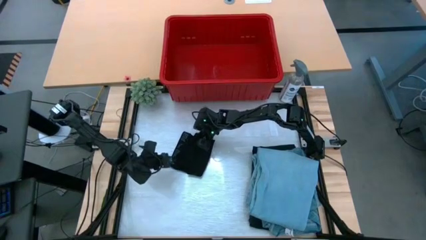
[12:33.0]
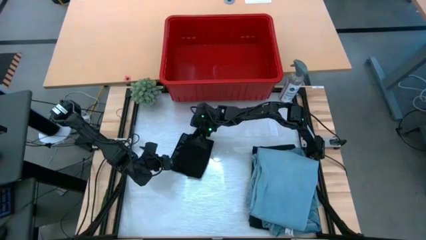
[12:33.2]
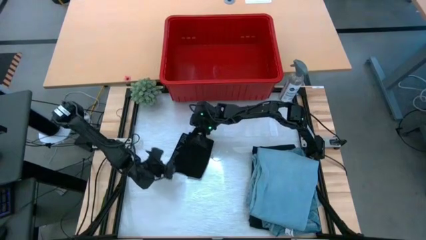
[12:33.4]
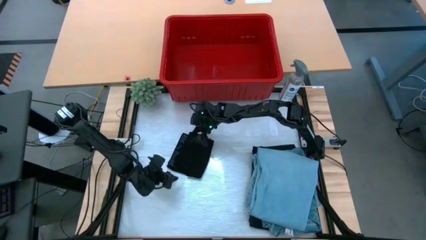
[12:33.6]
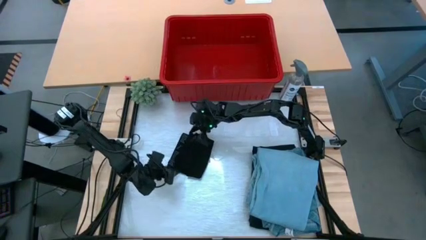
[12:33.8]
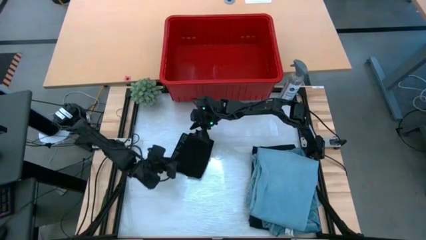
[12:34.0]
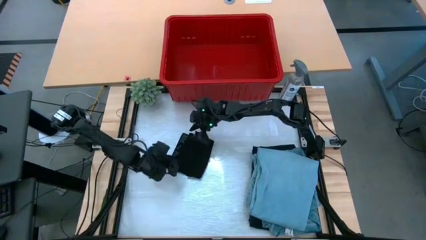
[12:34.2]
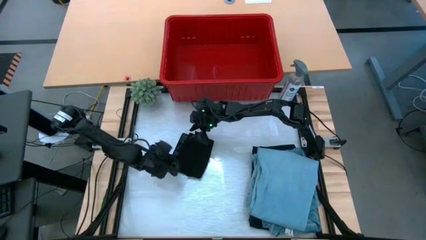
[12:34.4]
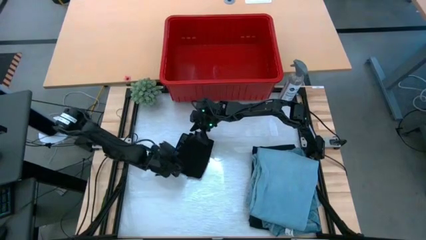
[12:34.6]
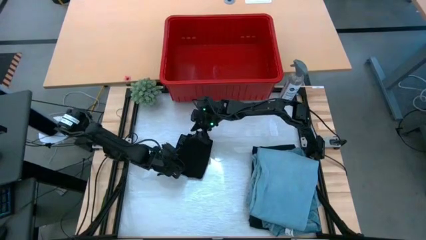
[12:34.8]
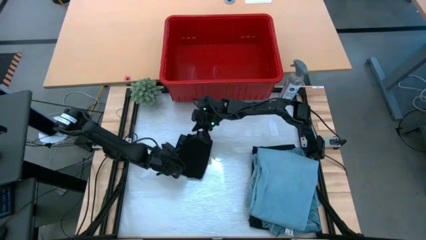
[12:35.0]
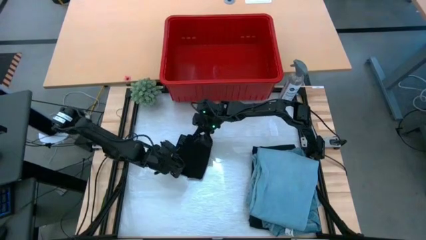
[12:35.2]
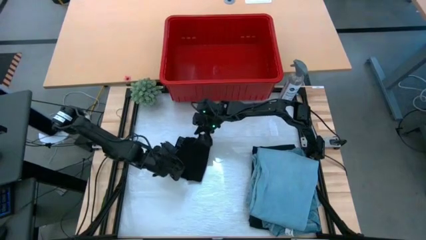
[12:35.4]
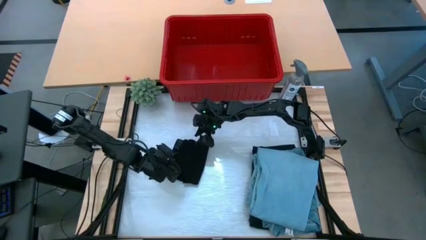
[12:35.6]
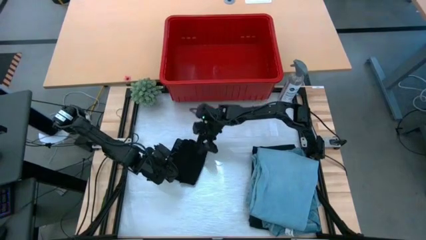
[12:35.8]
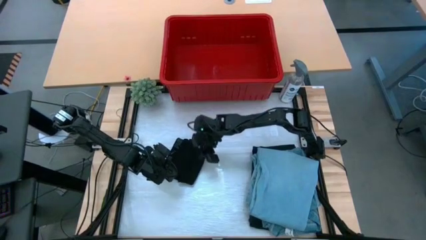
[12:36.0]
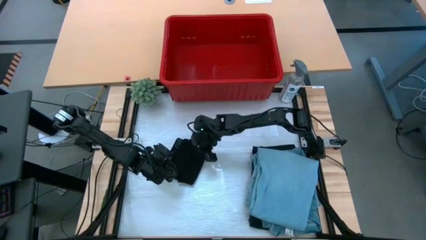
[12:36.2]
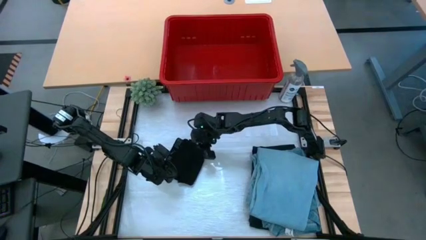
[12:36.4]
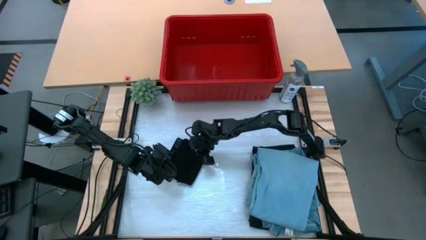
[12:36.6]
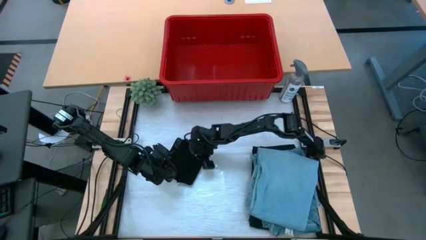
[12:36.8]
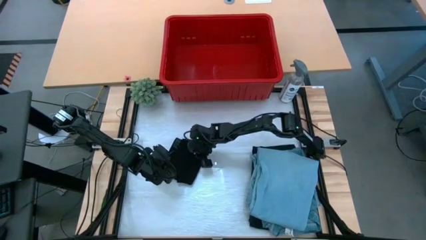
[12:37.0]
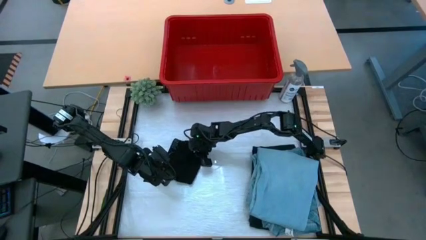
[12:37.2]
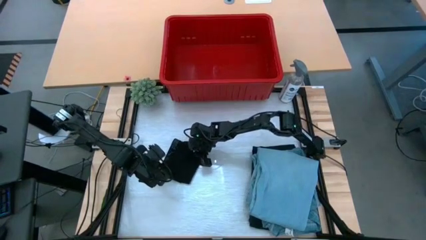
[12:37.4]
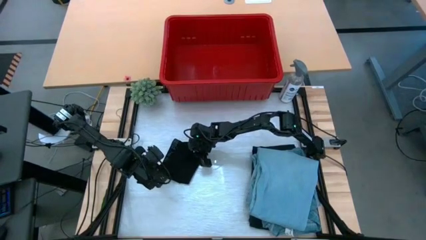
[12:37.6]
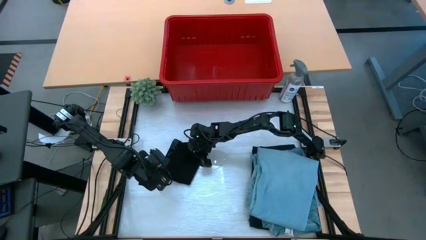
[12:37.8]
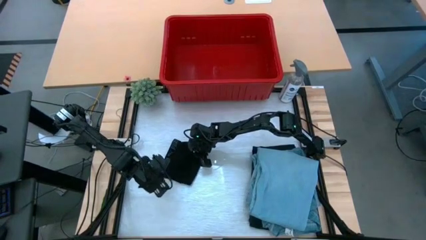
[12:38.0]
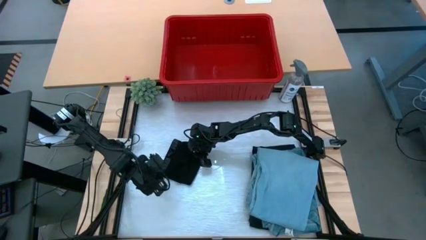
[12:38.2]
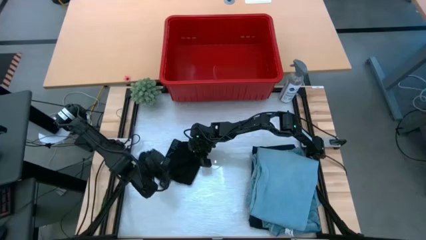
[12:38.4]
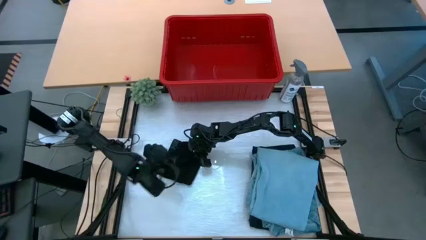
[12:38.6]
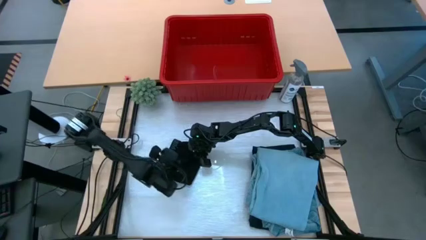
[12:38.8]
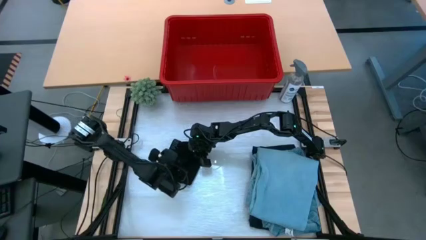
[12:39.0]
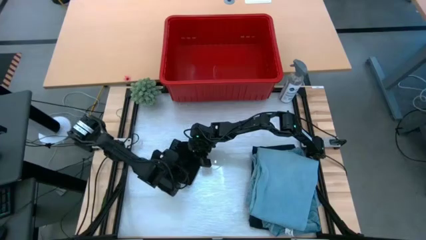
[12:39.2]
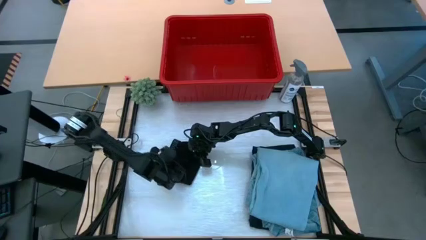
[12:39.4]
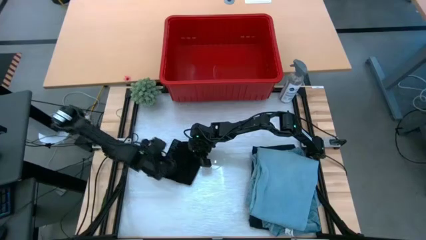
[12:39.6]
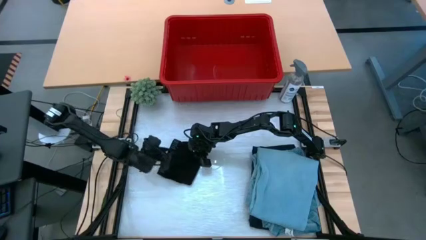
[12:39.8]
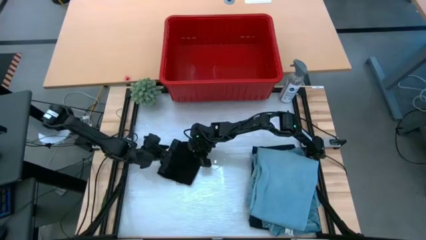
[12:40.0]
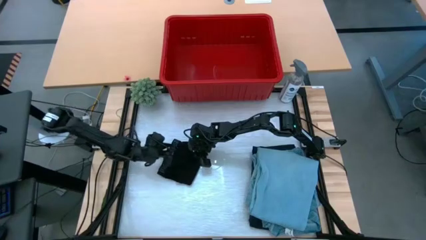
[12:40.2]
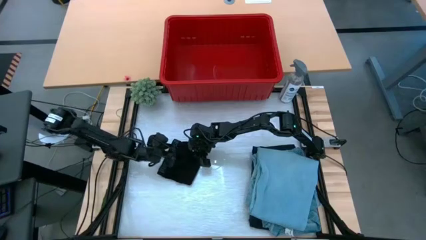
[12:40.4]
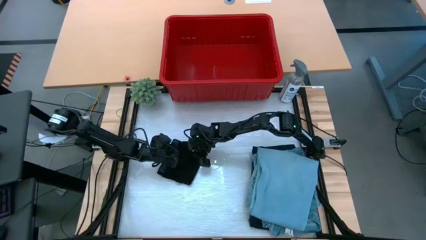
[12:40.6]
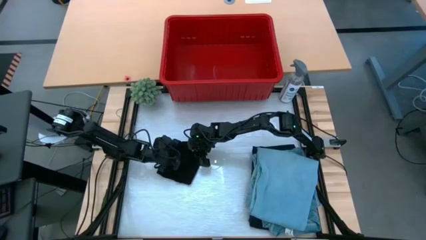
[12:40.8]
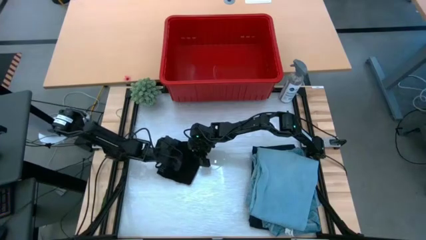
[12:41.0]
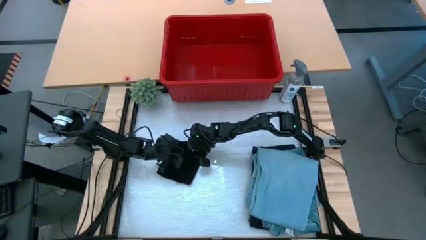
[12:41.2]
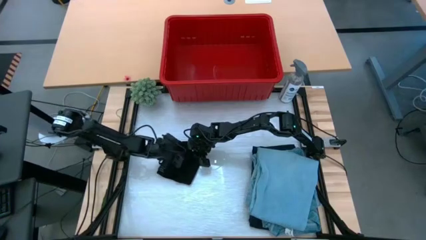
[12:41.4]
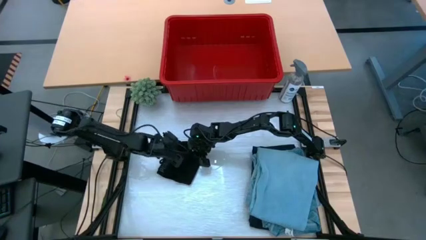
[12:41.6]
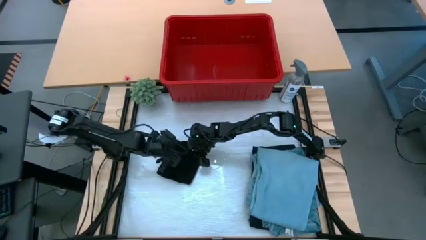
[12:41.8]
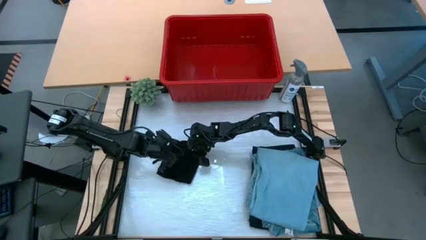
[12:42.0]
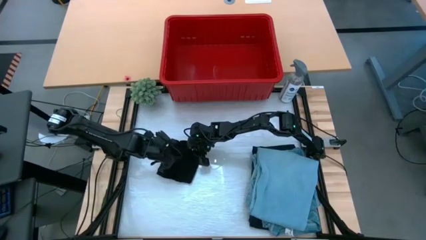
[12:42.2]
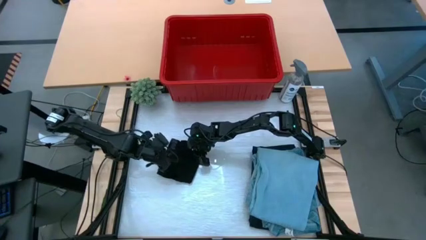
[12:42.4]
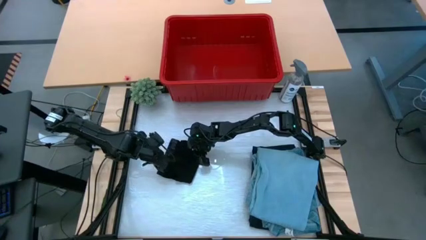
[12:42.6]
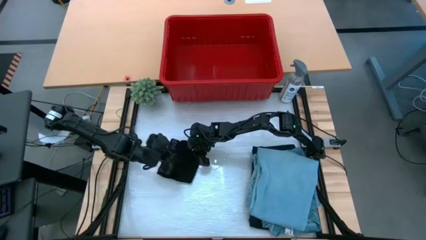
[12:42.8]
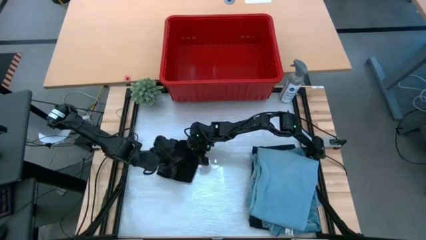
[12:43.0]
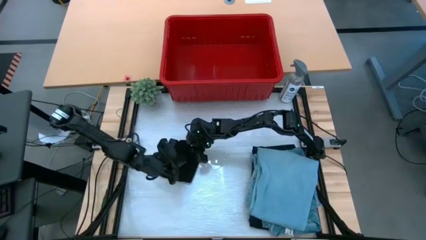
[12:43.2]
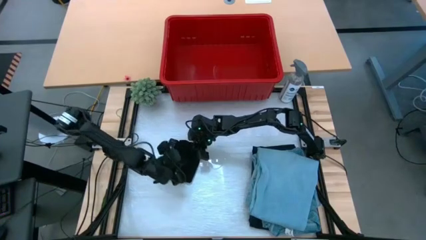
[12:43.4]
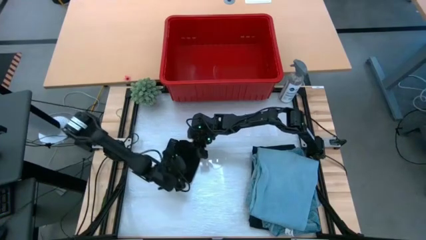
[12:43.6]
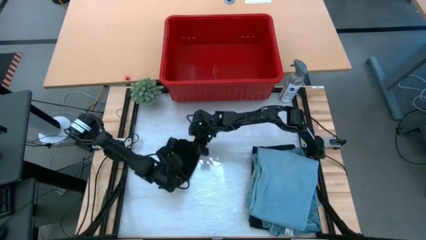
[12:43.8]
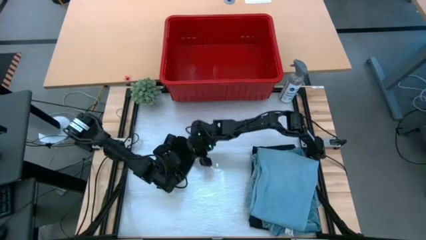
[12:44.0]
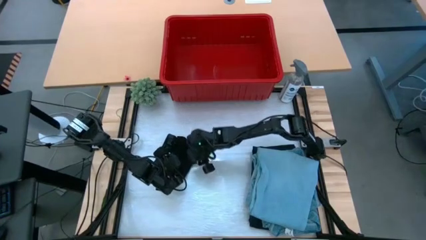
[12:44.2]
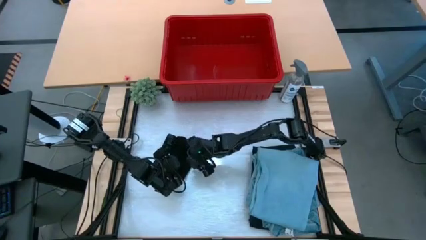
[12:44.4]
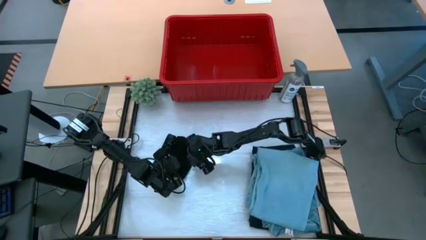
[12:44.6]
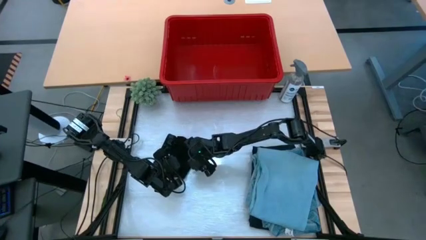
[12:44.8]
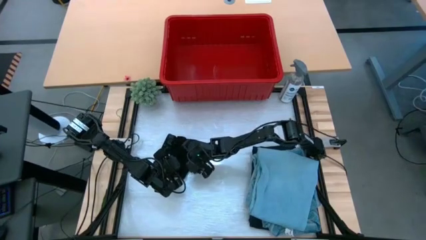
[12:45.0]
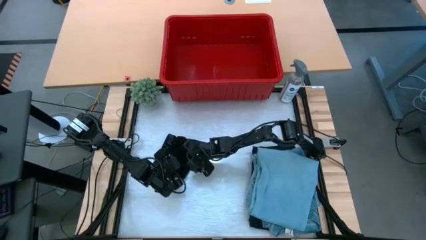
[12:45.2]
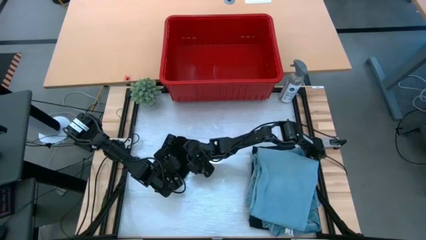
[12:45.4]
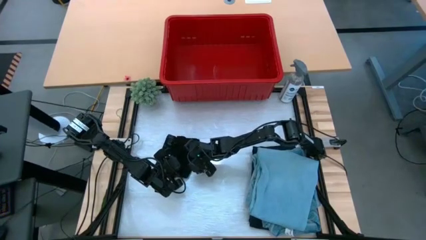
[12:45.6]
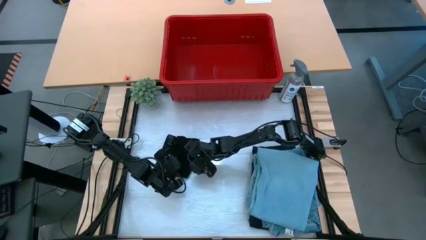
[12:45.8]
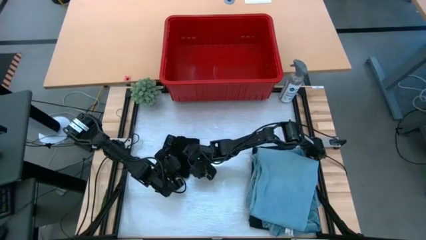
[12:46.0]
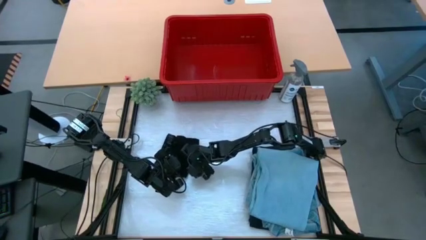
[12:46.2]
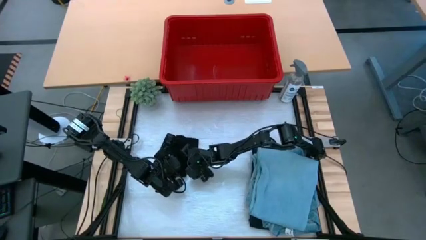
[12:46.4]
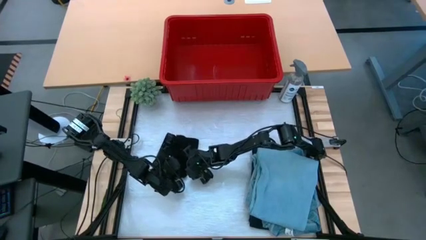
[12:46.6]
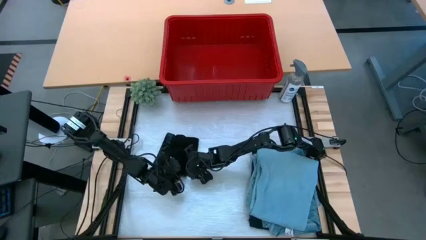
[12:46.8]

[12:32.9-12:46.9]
Task: Fold Laundry from Bin
Fold the black boxer
